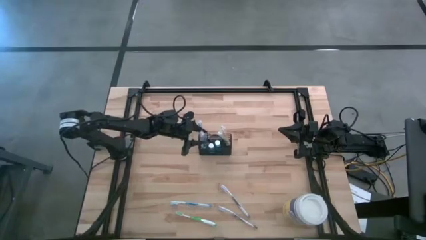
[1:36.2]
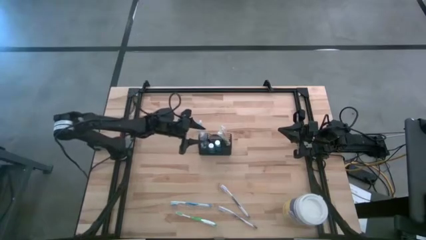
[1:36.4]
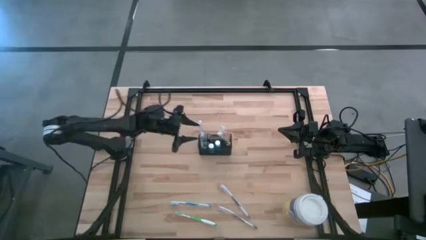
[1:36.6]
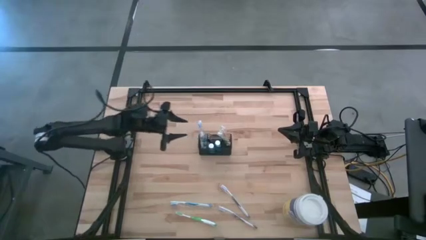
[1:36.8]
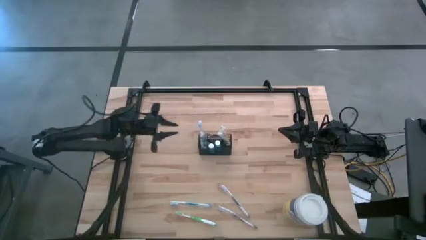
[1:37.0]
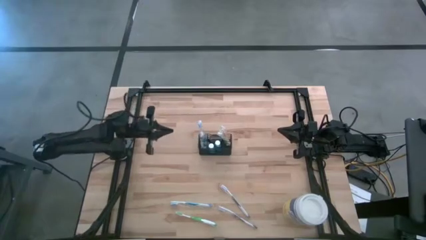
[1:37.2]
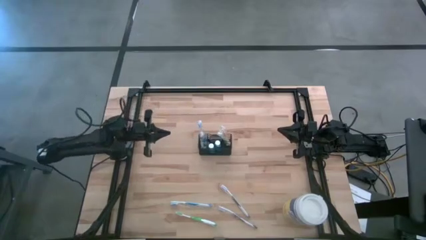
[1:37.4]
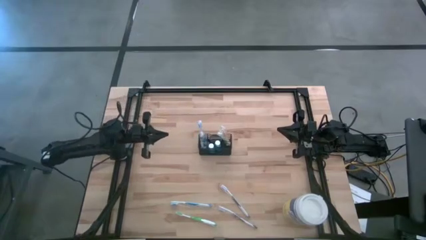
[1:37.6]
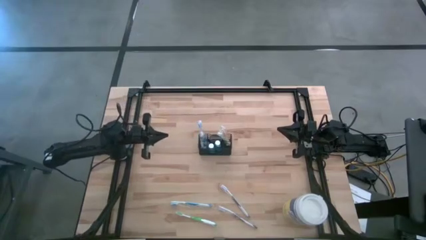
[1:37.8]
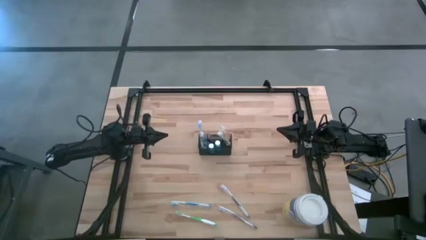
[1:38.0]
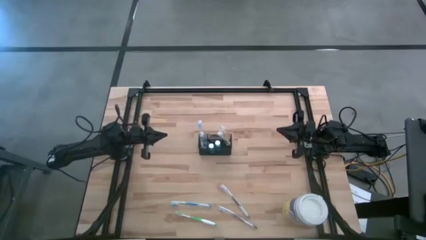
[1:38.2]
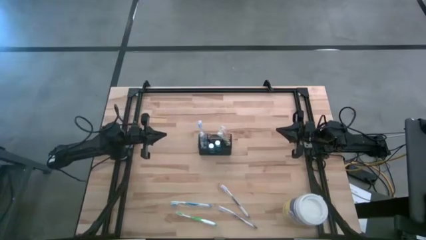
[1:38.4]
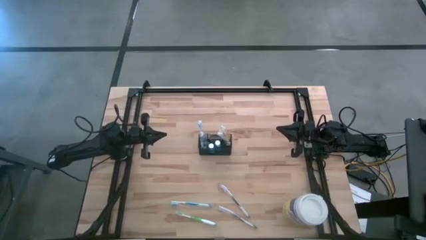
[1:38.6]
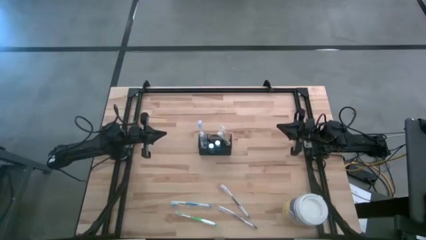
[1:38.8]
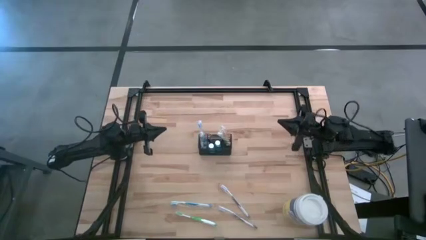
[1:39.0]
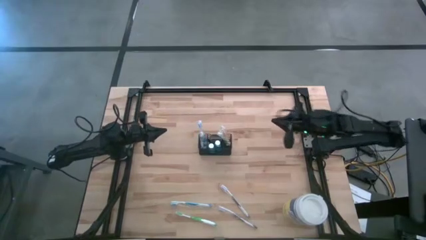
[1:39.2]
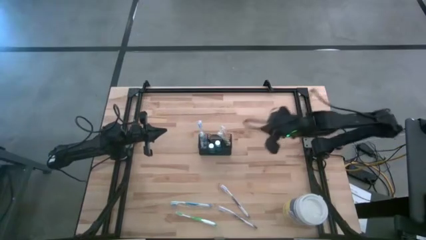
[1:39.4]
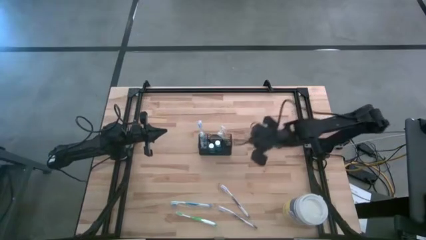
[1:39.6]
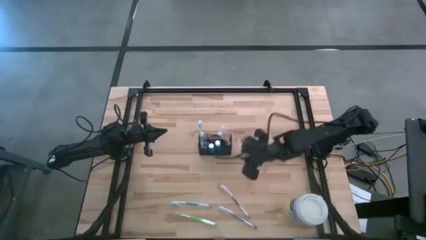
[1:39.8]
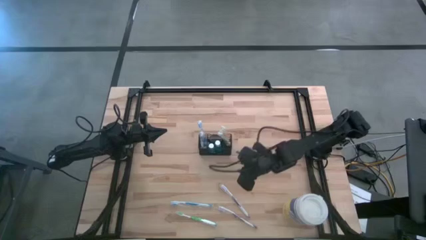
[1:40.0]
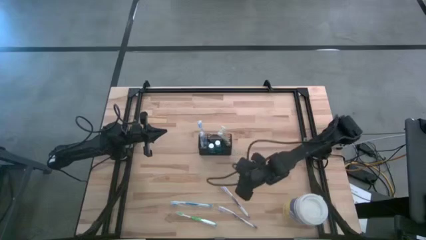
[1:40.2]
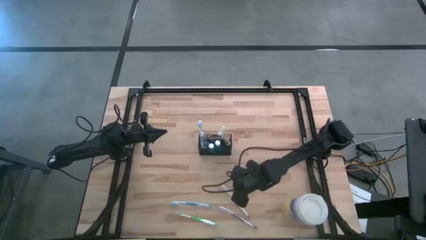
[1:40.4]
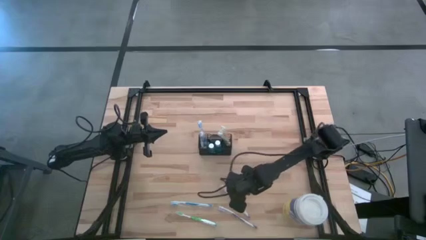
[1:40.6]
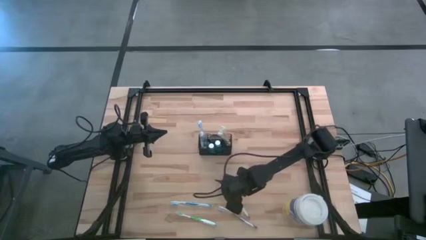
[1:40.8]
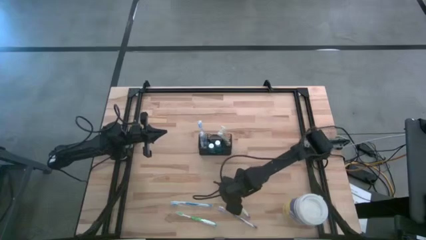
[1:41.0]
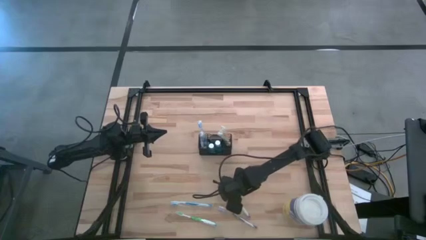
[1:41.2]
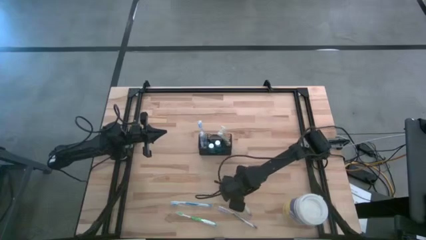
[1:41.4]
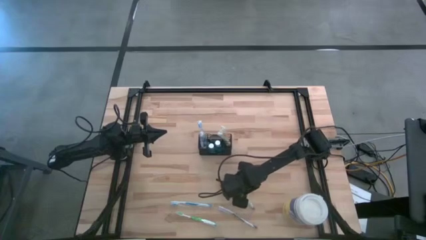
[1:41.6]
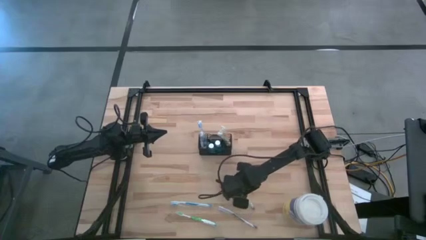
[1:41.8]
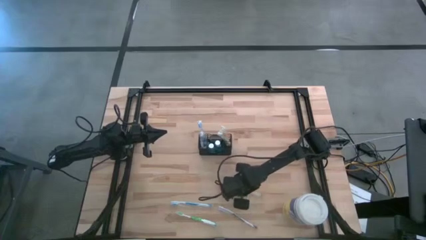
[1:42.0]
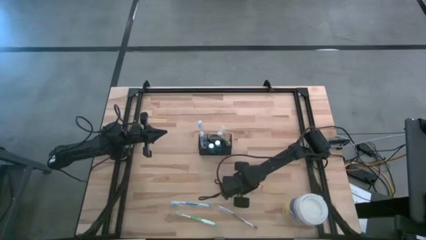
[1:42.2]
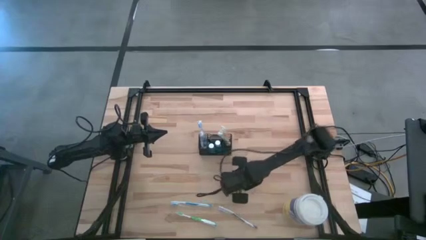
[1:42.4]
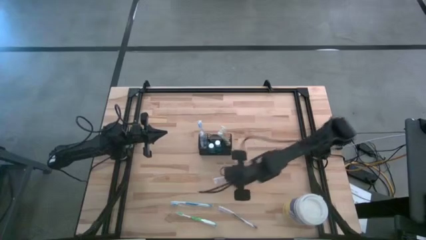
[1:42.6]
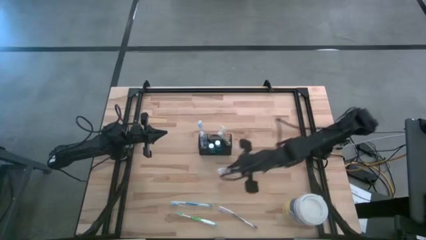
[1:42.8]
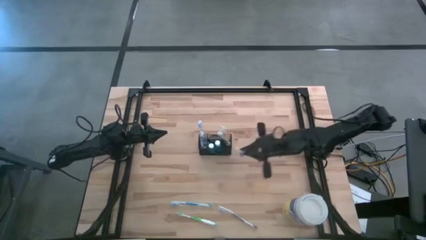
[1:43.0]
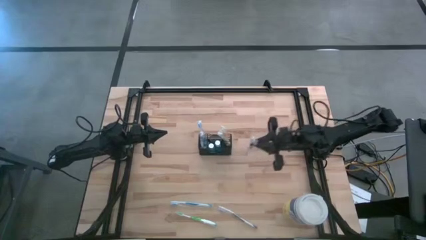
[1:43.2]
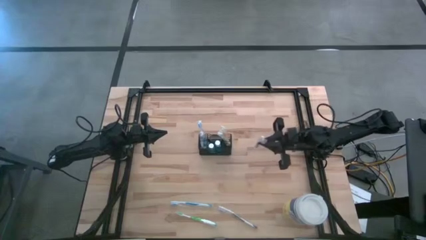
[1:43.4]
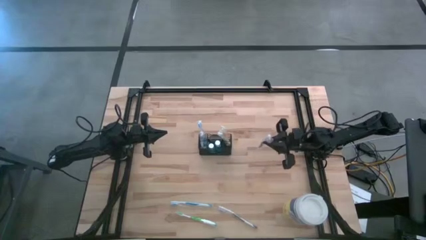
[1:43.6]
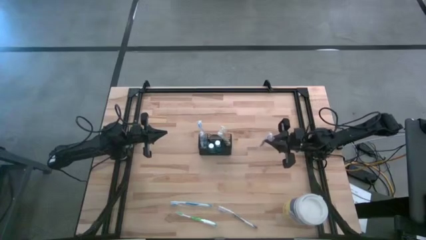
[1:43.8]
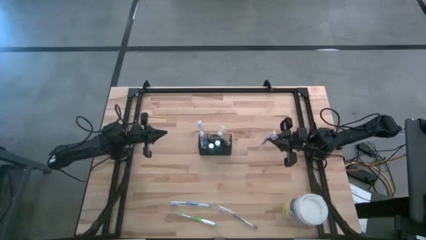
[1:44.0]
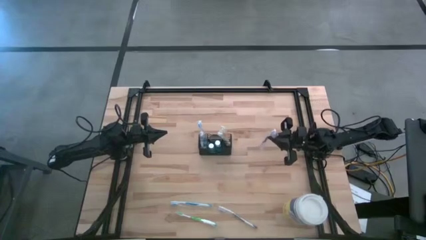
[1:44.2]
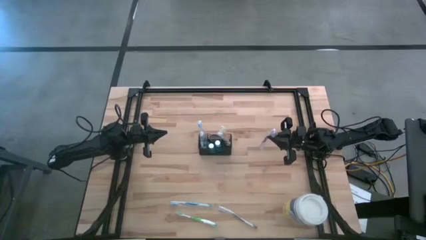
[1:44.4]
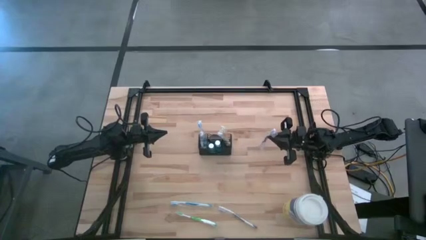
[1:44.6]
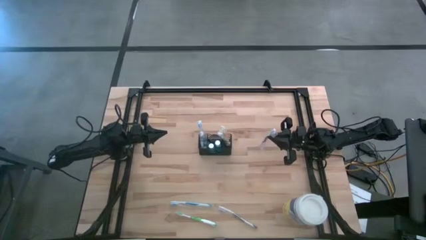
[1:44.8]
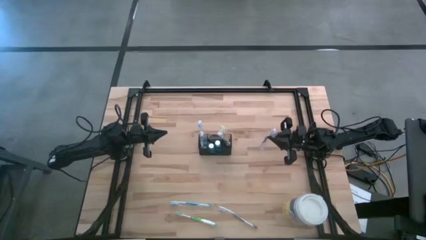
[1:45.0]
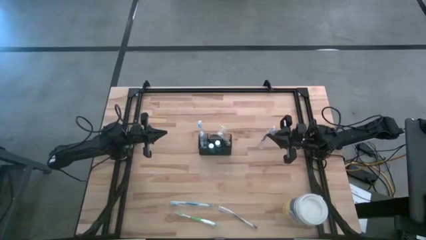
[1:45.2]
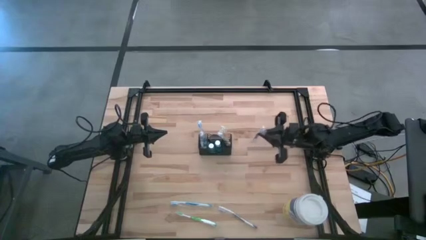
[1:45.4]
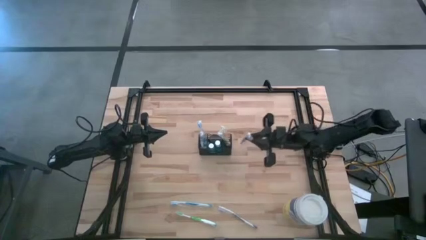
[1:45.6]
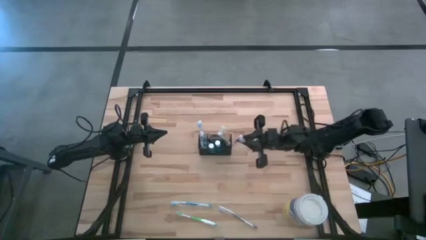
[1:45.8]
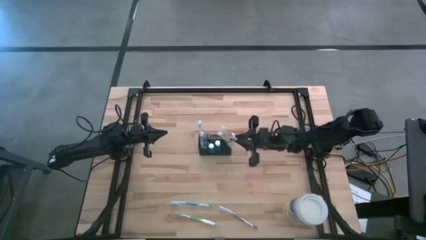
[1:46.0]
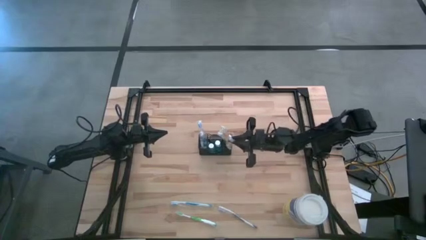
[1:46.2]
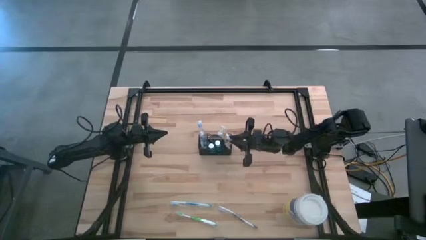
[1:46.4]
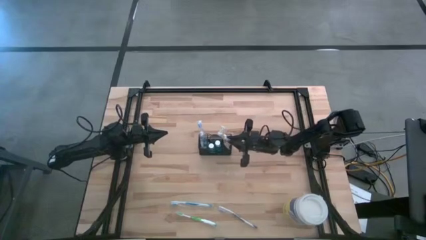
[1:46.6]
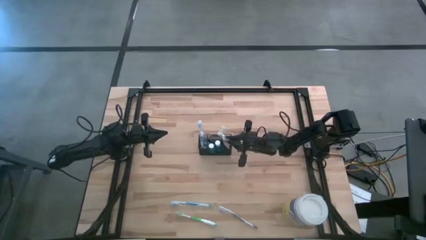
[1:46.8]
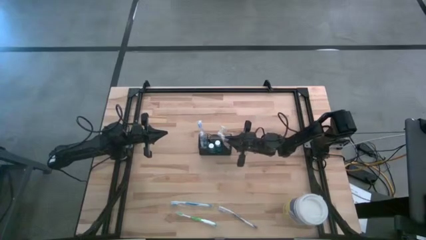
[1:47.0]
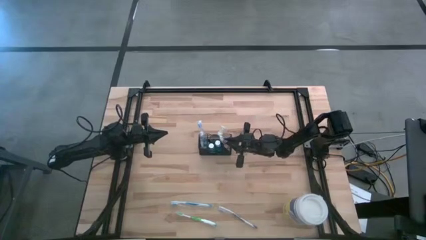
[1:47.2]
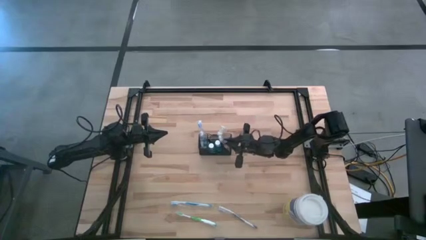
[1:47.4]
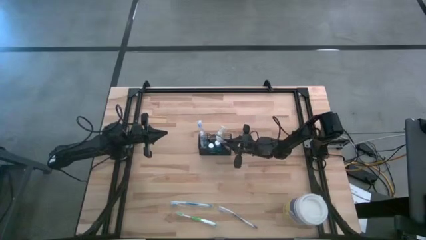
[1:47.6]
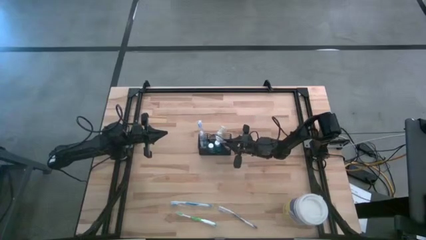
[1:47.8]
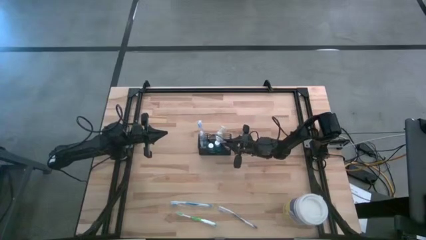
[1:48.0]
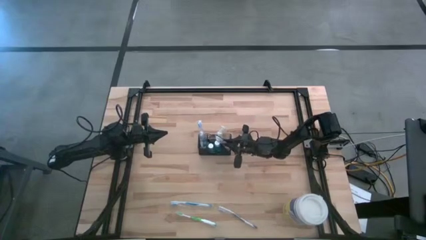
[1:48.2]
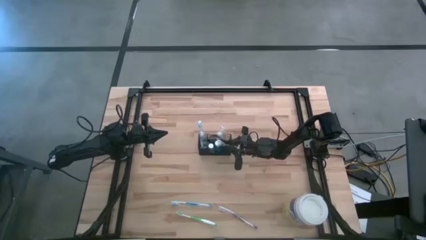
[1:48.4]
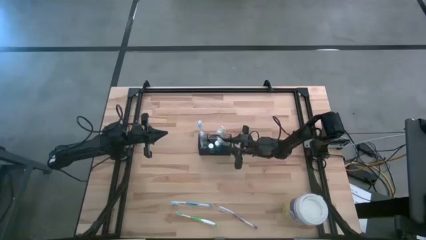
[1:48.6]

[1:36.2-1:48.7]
Task: Pick & Place toothbrushing station
Put the top purple toothbrush into the black mesh organizer
